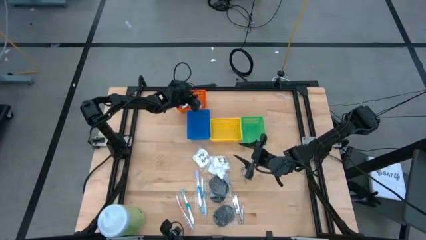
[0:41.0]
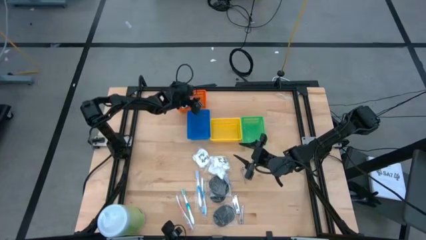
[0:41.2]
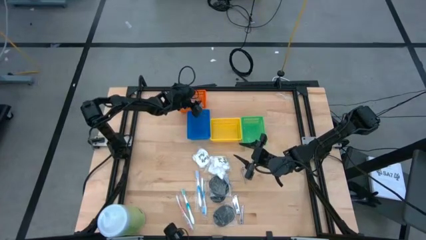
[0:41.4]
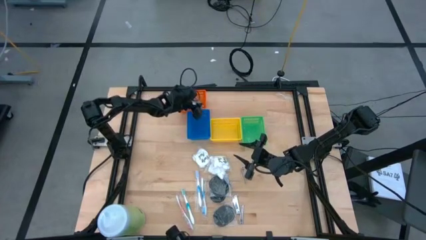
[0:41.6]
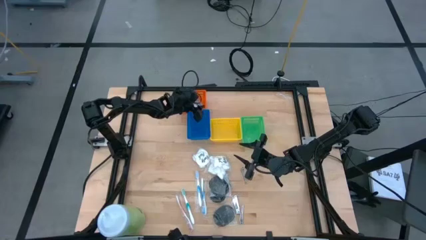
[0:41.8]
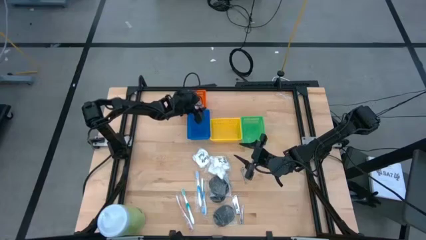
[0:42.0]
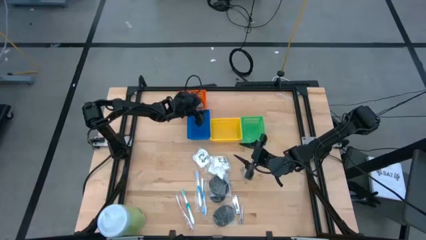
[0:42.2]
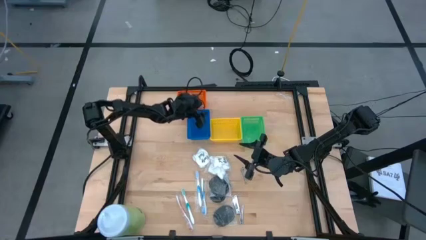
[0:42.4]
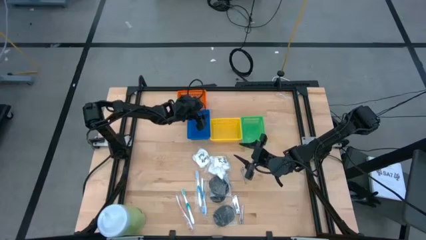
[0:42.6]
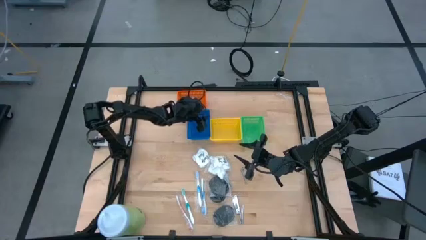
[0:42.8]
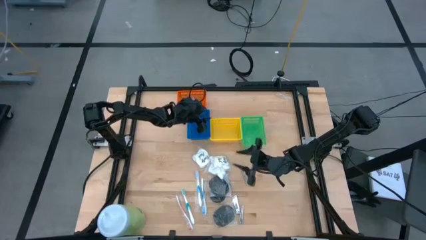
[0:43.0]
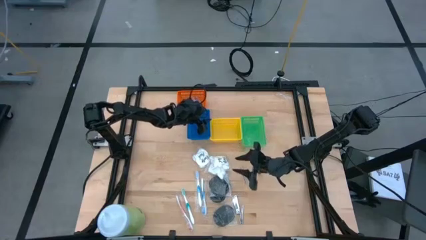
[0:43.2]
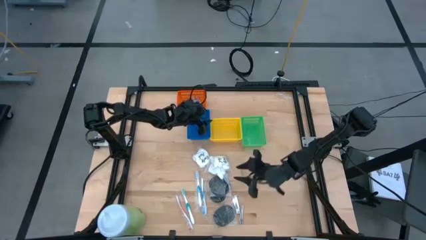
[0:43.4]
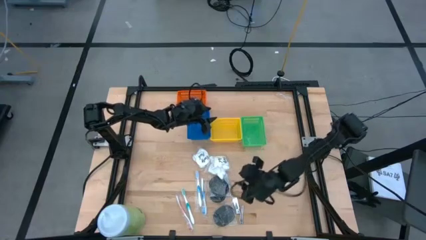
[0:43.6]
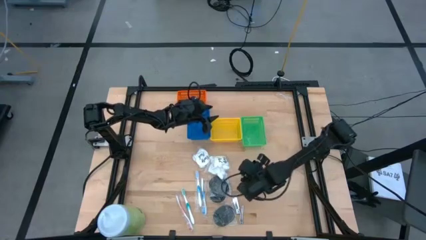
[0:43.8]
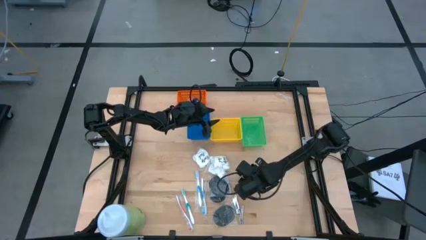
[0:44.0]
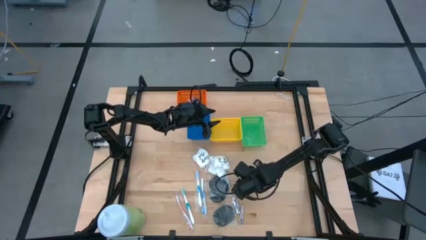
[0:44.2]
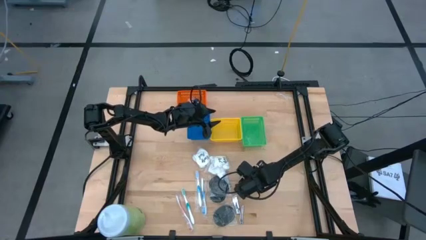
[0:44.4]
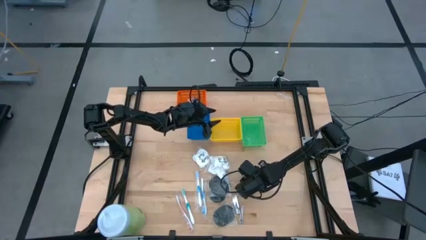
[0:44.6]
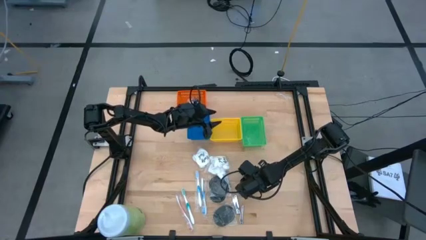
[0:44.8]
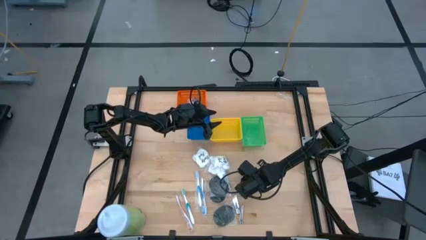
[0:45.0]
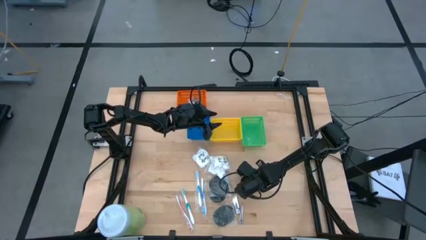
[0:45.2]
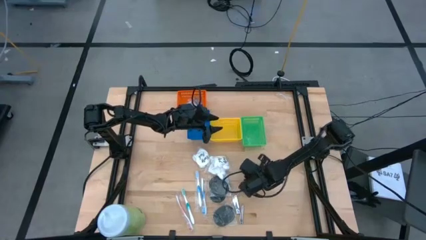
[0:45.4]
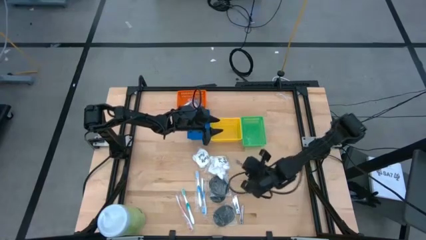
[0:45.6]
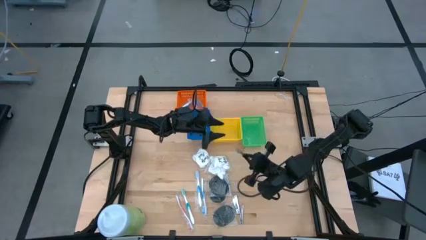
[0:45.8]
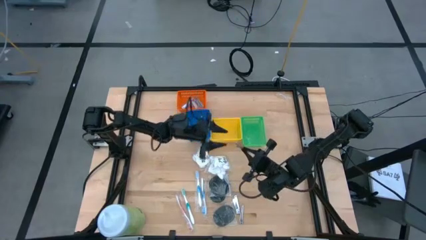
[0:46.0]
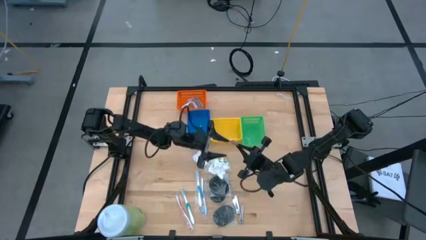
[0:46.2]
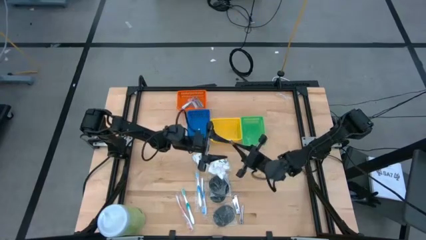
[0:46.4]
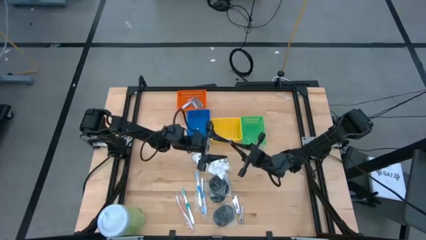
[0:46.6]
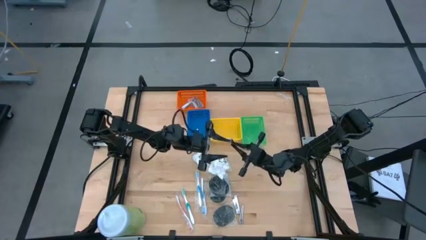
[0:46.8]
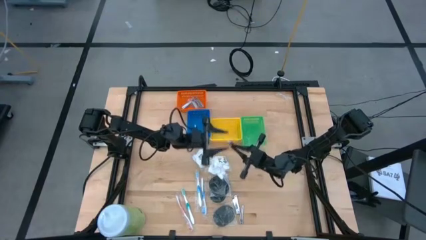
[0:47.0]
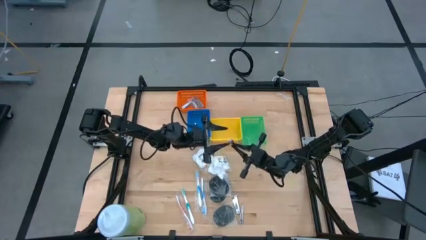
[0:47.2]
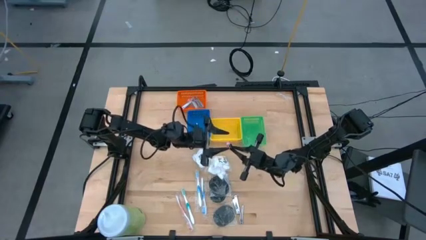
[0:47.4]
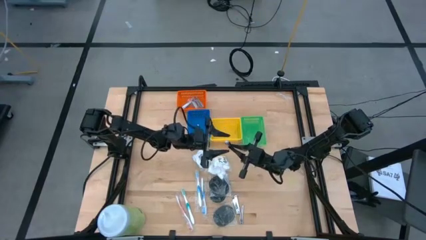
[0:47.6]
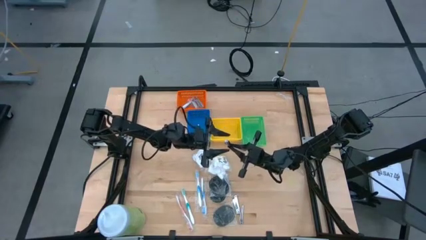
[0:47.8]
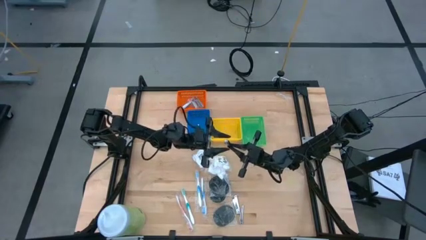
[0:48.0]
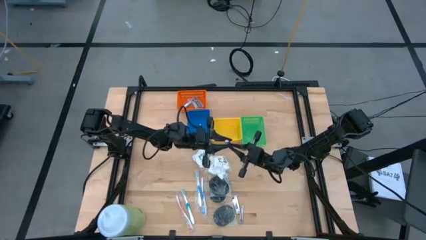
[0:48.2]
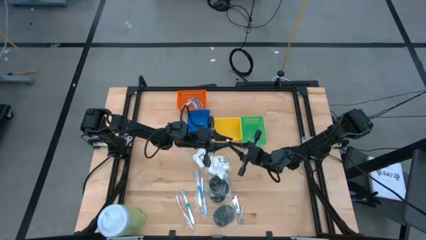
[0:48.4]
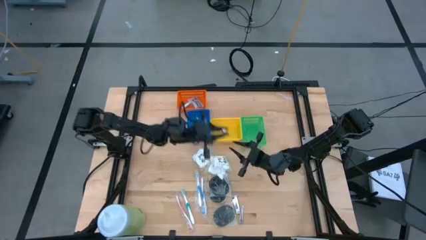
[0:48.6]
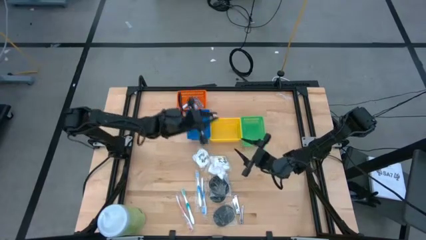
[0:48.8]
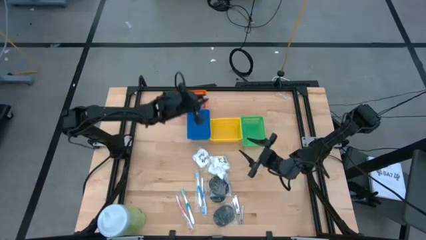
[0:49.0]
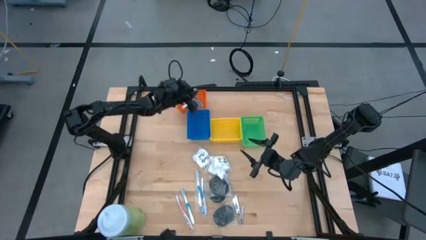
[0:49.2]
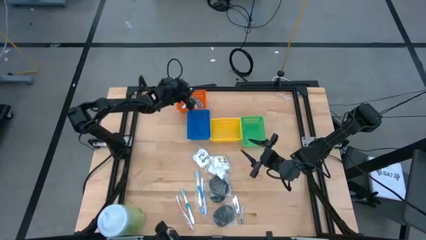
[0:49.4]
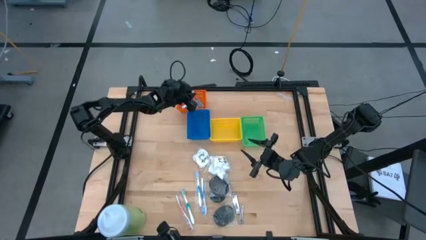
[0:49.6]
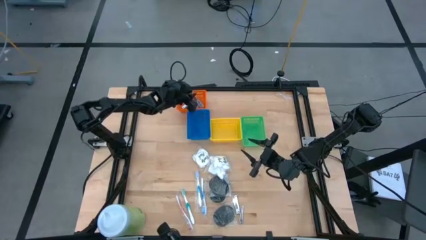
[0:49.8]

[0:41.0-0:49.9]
Task: Pick & Place Travel size toiletries
Put the nail cutter into the orange basket

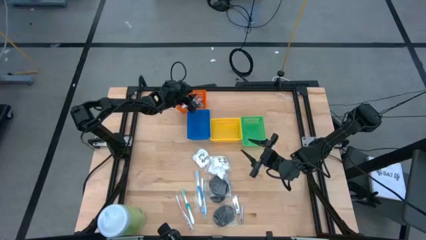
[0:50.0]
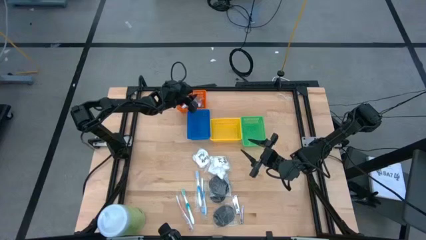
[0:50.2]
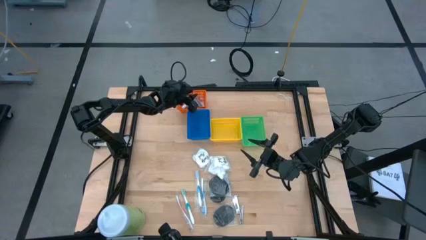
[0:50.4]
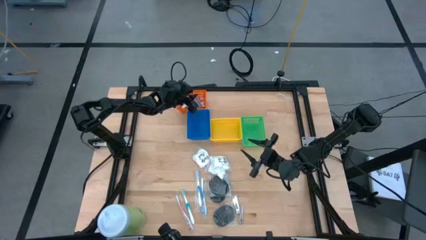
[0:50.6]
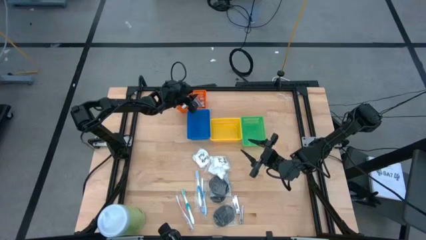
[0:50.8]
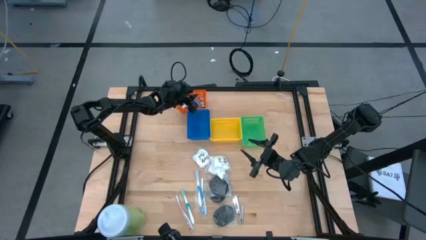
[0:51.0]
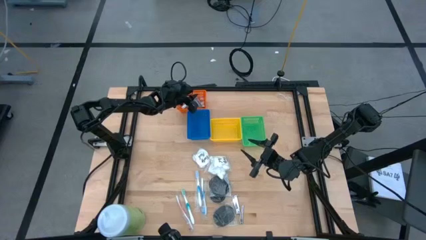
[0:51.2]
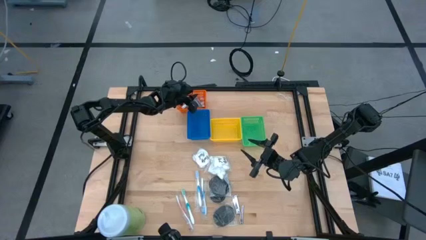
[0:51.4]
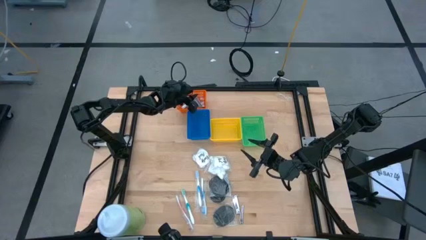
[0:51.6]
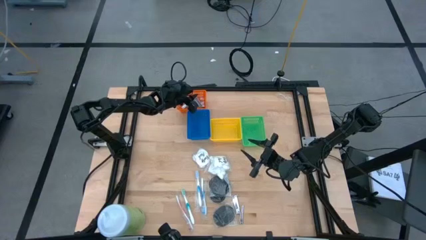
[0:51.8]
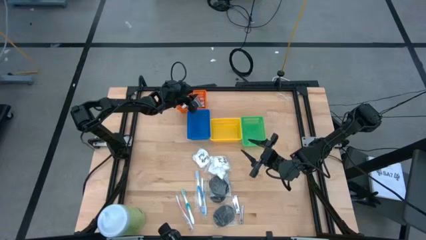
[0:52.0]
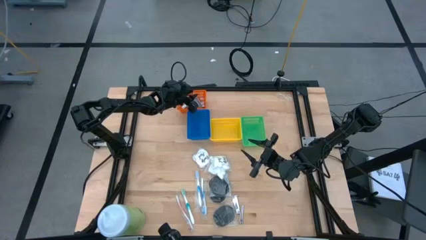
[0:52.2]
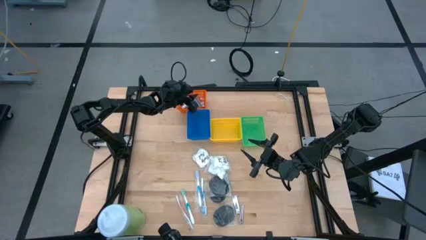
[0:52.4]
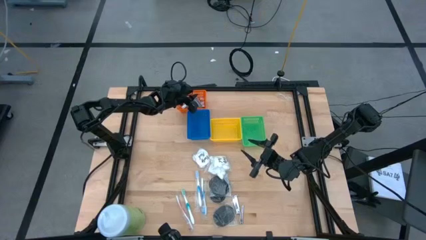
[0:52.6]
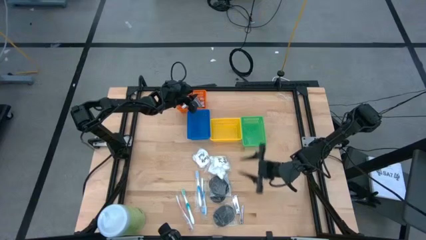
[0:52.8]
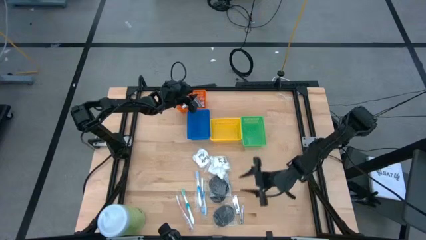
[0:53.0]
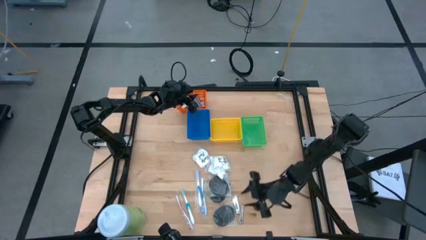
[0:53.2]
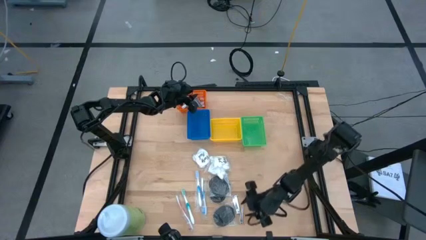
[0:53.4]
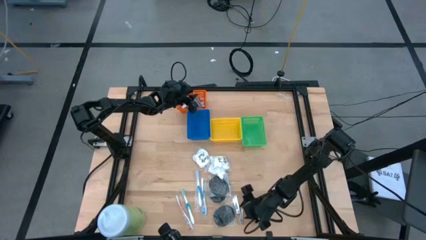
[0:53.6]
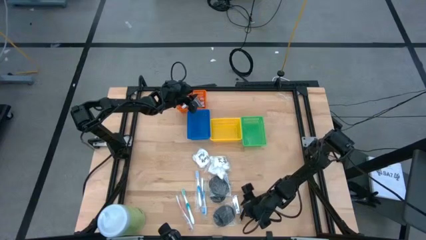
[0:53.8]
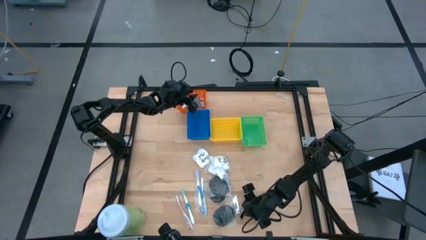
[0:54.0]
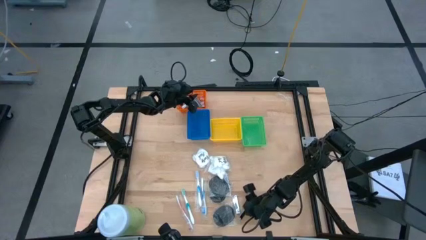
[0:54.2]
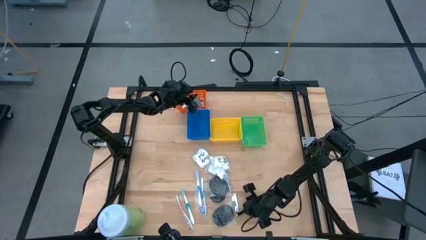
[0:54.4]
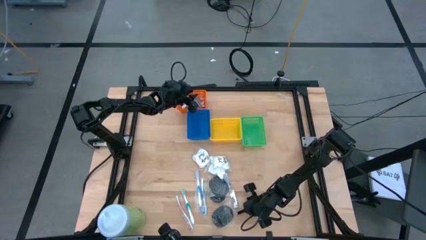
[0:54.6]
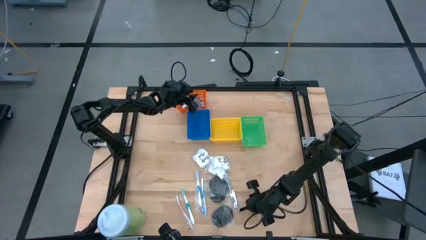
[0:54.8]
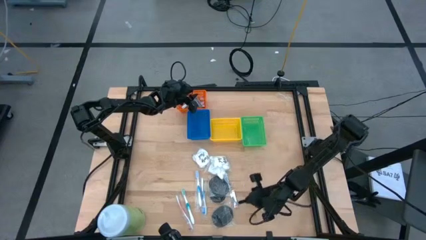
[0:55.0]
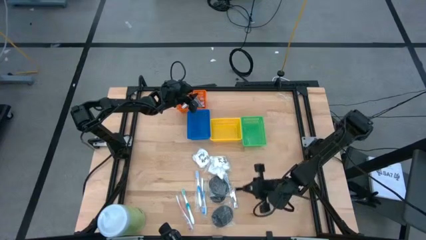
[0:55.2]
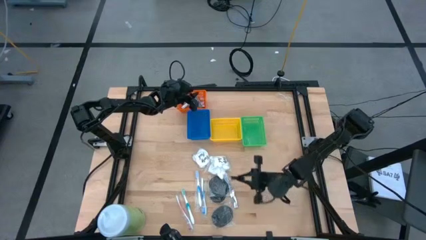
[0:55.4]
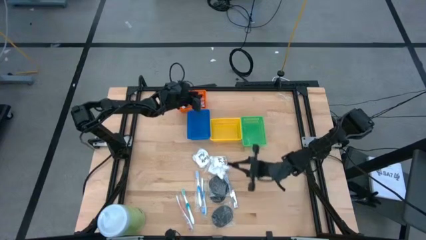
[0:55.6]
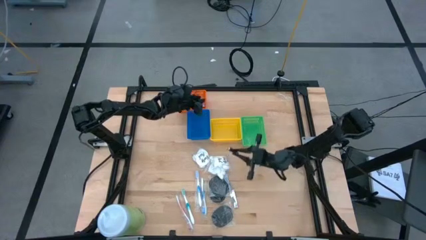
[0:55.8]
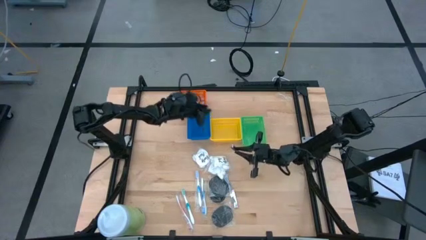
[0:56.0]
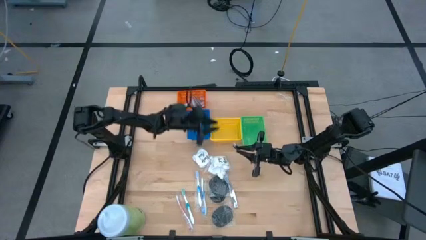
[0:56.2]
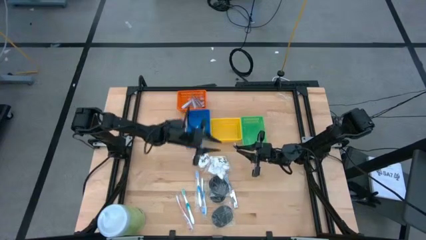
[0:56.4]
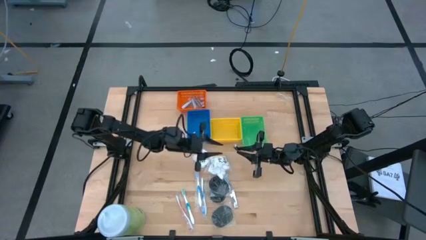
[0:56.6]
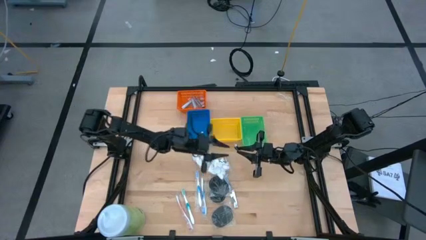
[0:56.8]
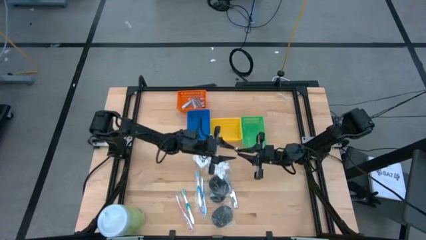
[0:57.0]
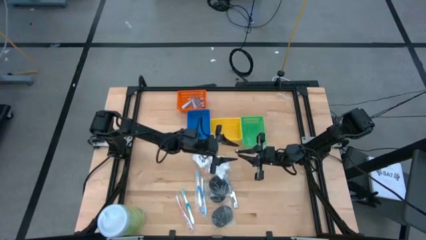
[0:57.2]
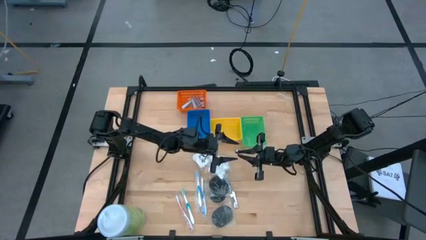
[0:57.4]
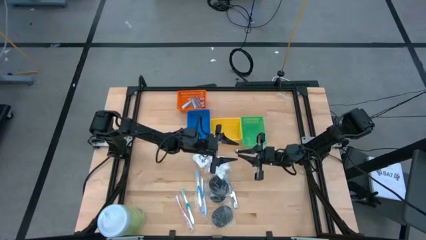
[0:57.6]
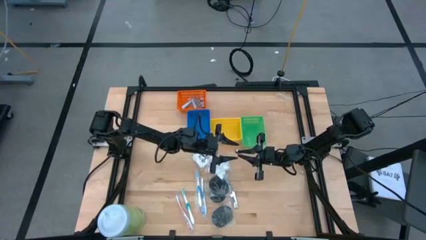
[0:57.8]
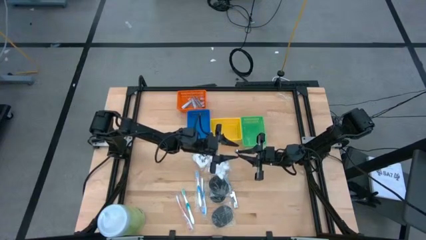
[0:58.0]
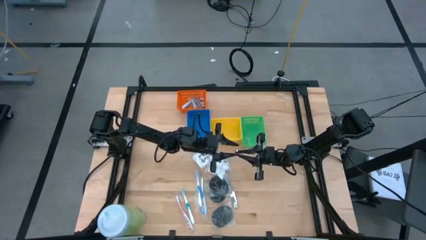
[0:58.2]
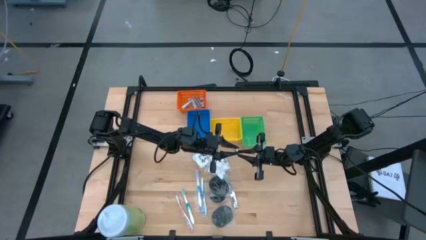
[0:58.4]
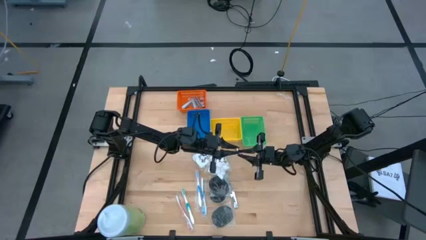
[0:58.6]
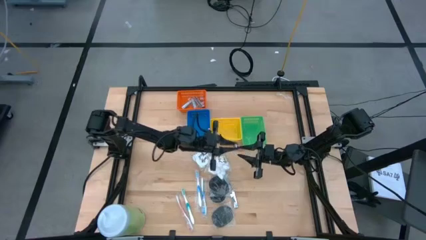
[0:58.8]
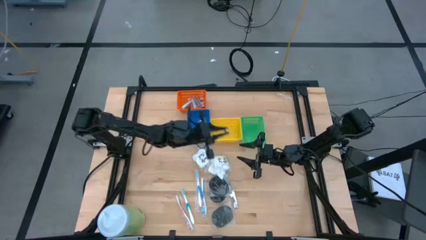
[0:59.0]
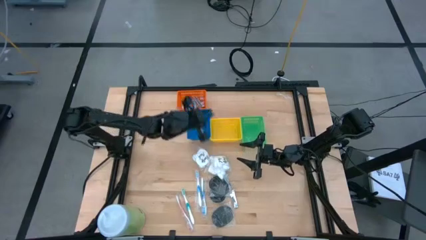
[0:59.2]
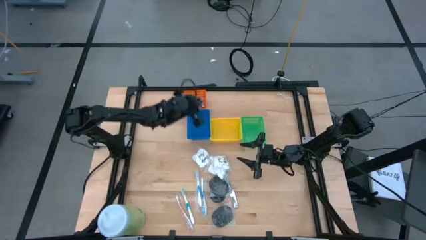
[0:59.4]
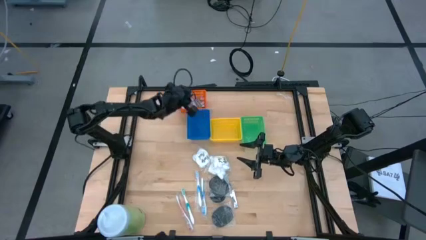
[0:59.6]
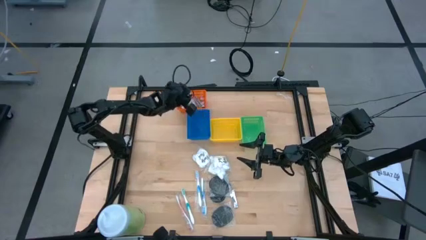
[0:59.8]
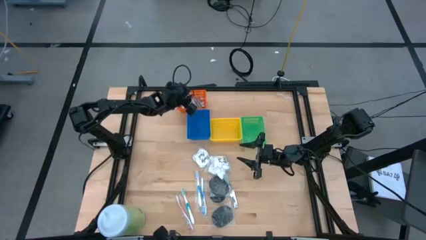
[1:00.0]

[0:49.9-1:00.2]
Put the bottom nail cutter into the orange basket
